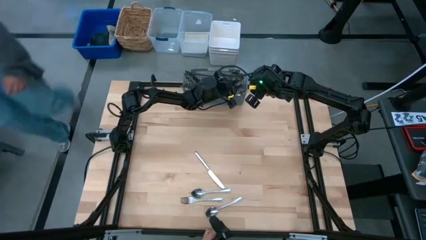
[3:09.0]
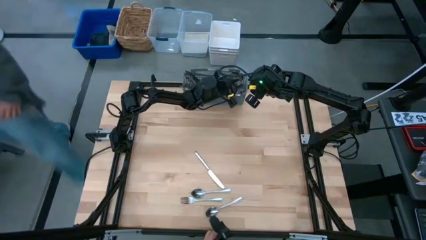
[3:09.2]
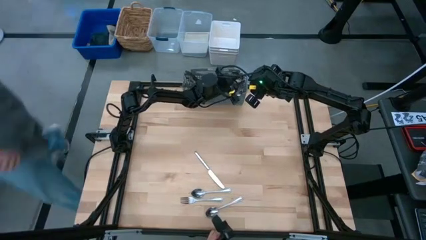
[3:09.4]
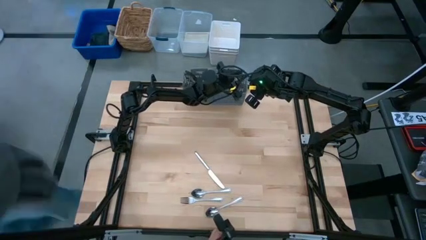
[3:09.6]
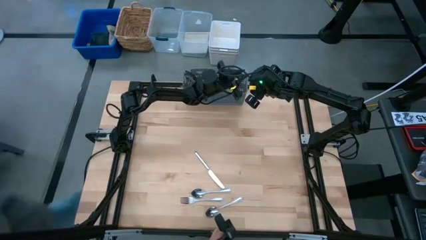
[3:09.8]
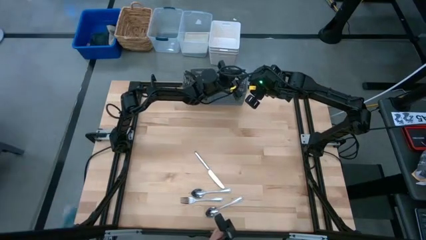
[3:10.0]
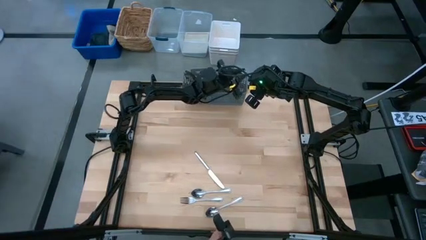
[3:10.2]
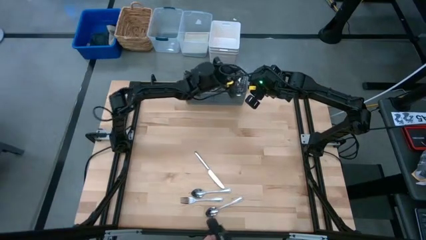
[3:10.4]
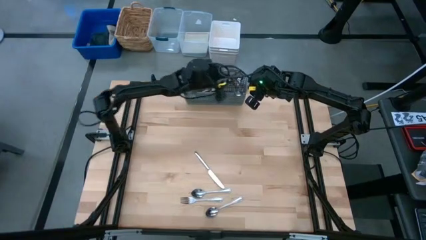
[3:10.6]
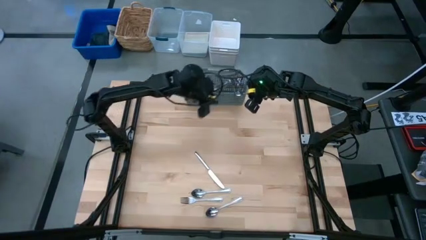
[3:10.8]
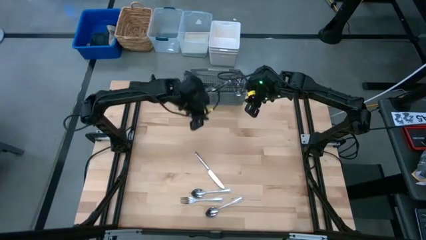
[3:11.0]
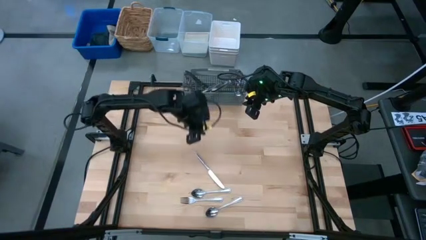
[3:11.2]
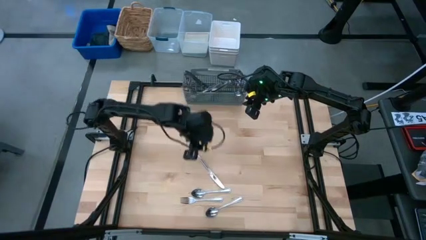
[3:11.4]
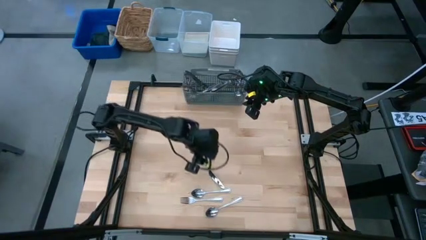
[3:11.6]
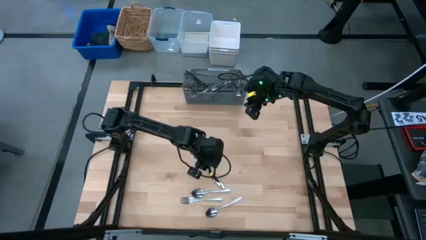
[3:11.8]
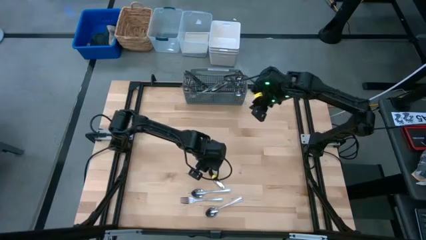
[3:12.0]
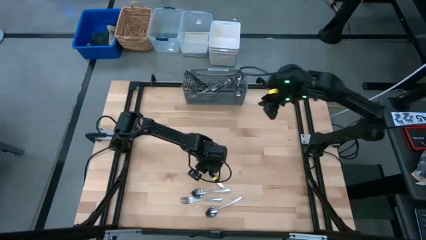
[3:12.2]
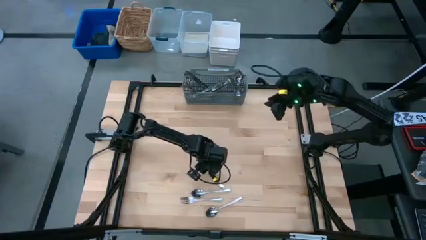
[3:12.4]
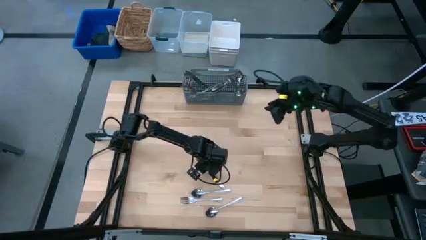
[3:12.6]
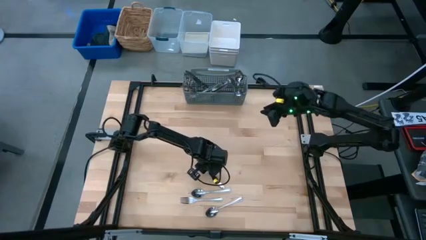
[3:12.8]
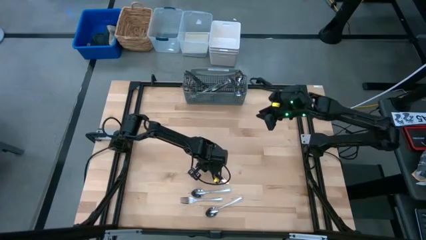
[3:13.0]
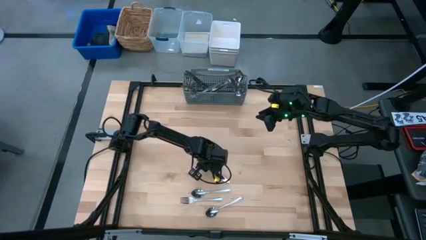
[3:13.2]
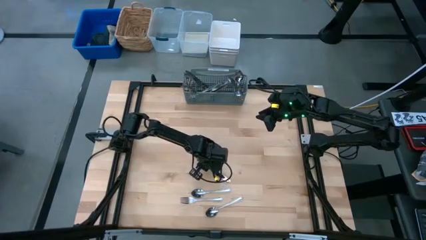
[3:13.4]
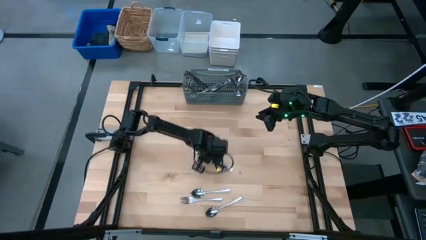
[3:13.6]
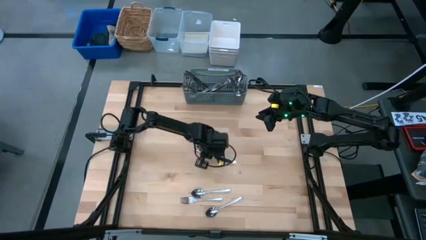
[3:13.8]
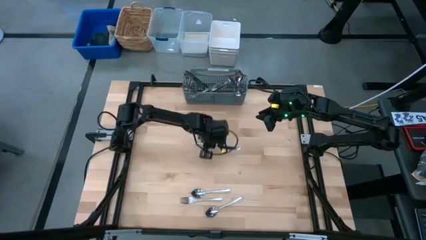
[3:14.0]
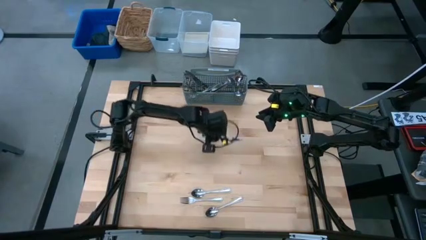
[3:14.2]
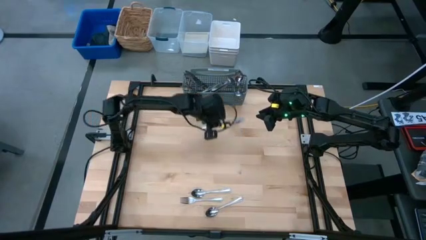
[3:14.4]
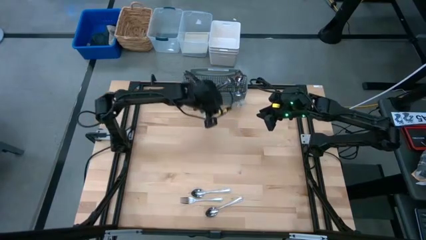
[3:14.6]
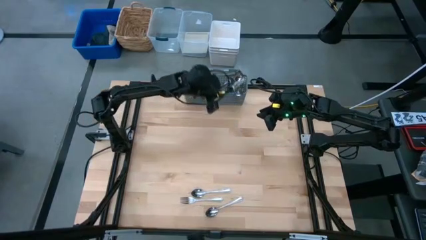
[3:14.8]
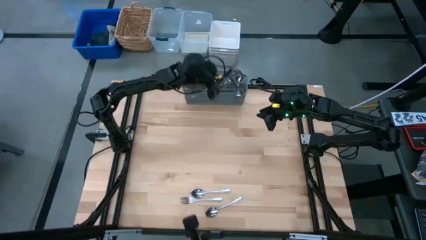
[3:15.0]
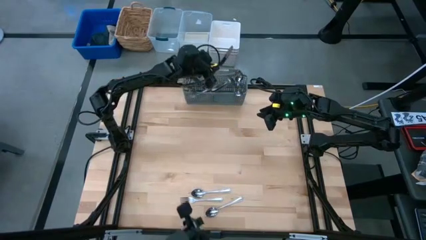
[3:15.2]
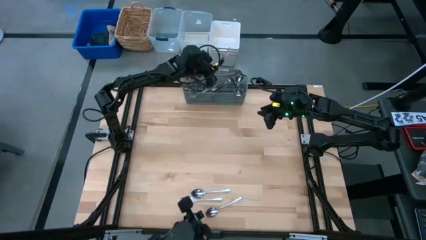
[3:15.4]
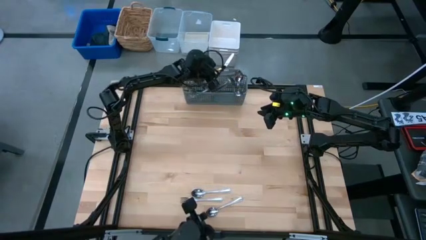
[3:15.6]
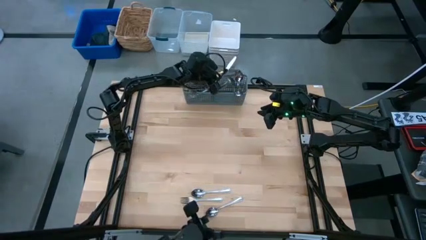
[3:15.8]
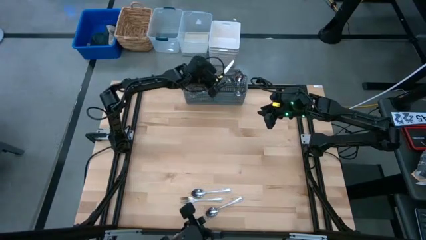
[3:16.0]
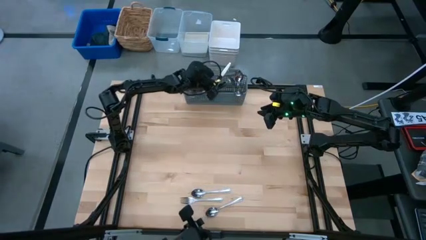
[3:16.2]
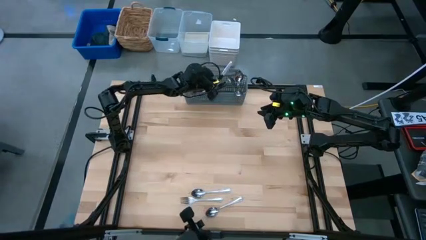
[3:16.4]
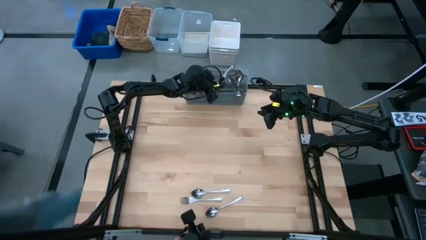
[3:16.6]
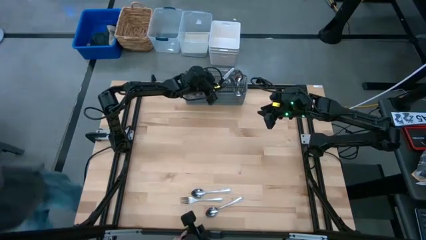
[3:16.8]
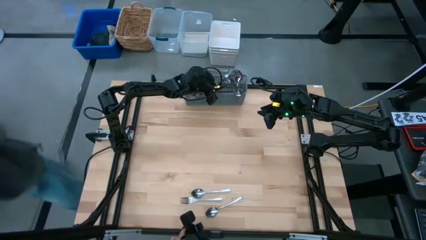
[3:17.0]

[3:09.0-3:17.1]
Put the silver knife into the dishwasher utensil holder

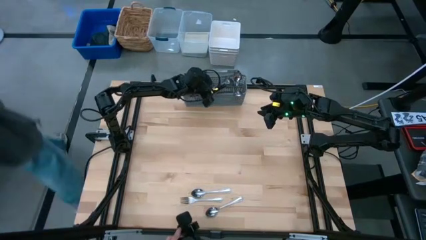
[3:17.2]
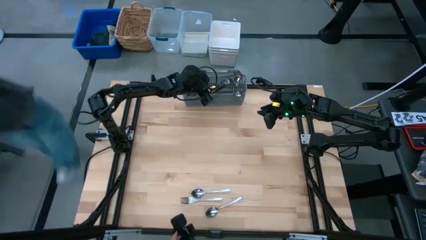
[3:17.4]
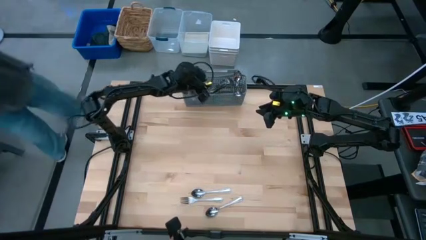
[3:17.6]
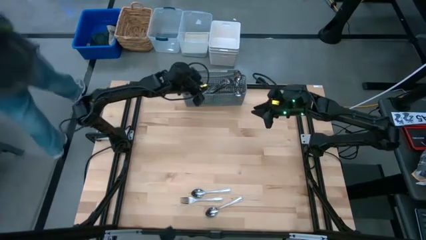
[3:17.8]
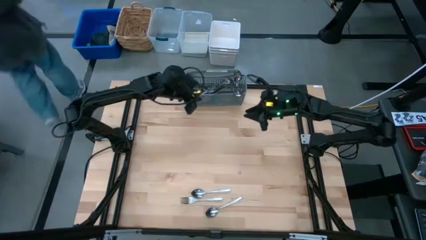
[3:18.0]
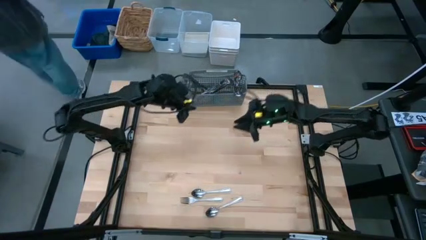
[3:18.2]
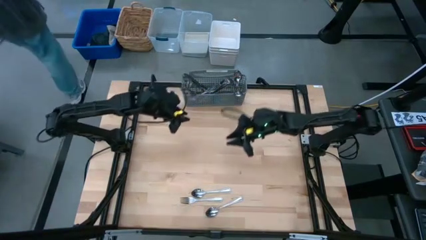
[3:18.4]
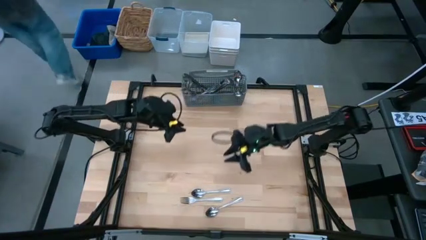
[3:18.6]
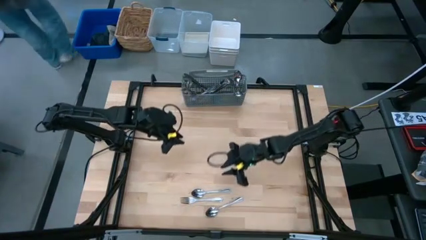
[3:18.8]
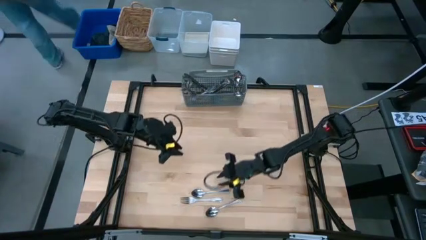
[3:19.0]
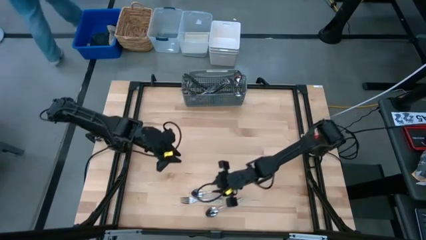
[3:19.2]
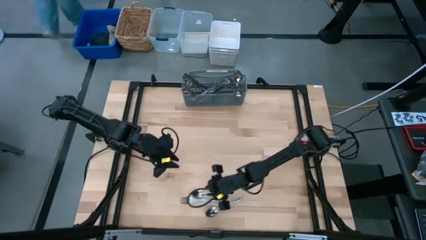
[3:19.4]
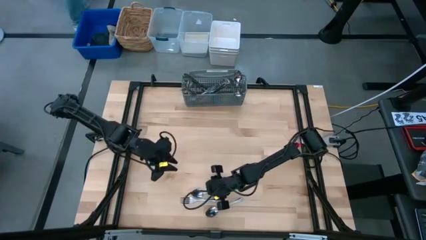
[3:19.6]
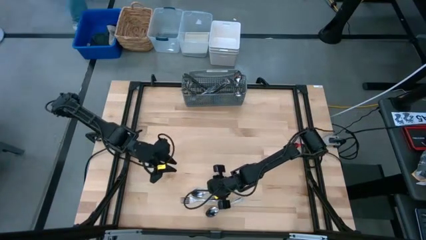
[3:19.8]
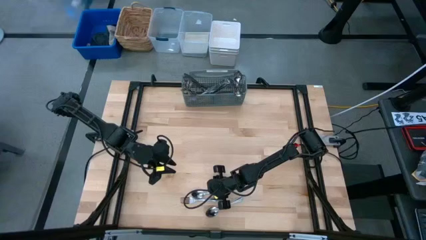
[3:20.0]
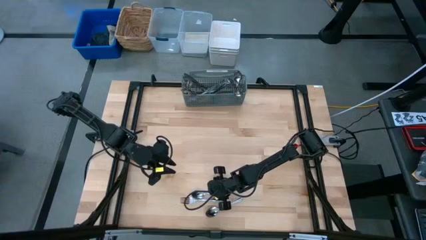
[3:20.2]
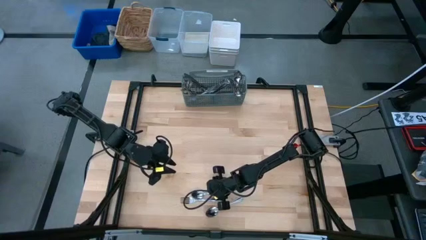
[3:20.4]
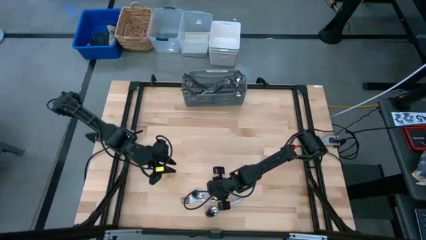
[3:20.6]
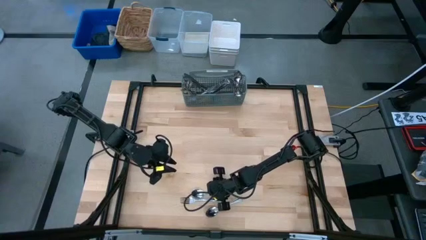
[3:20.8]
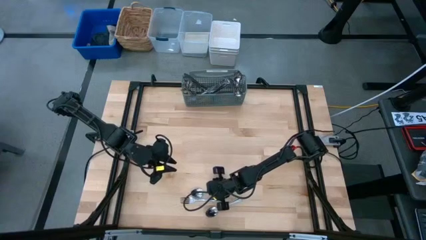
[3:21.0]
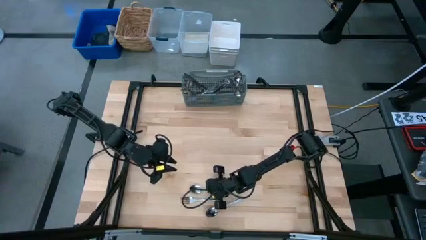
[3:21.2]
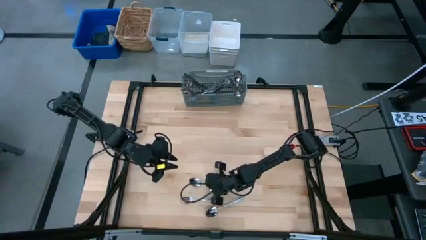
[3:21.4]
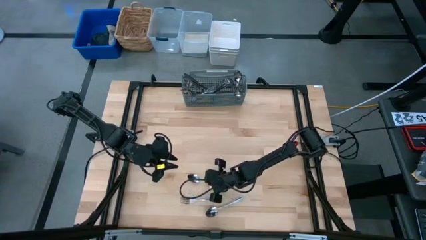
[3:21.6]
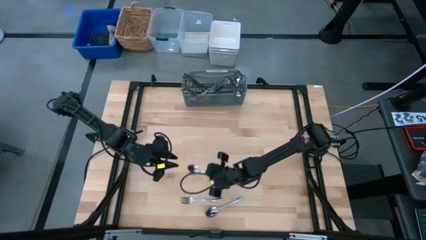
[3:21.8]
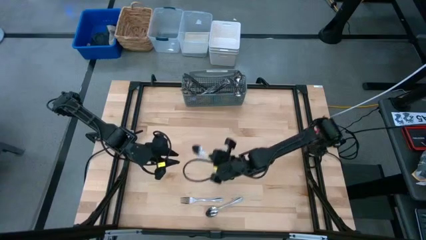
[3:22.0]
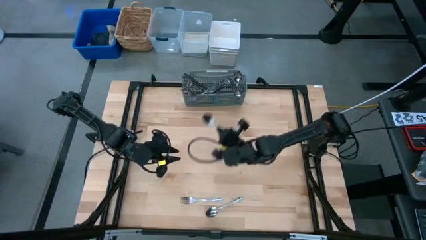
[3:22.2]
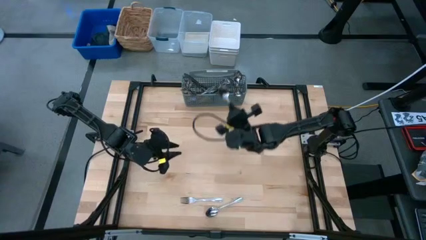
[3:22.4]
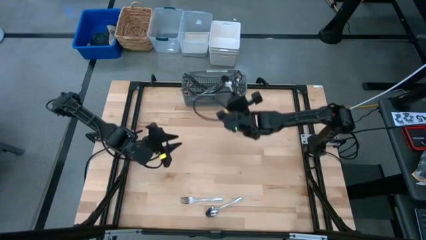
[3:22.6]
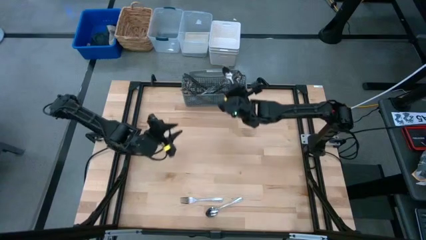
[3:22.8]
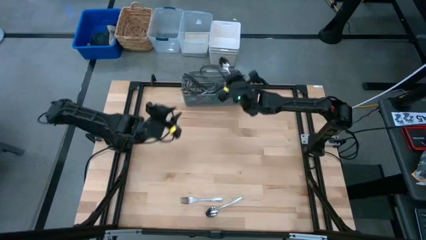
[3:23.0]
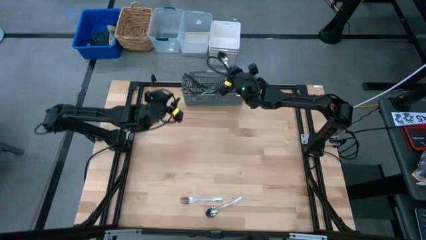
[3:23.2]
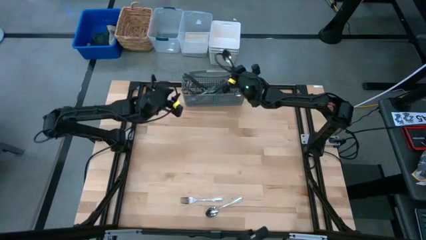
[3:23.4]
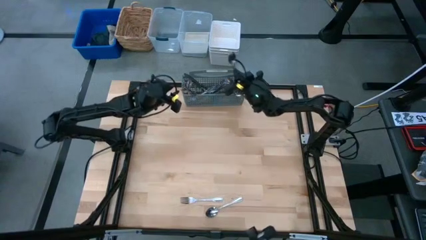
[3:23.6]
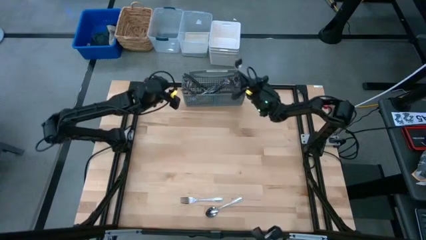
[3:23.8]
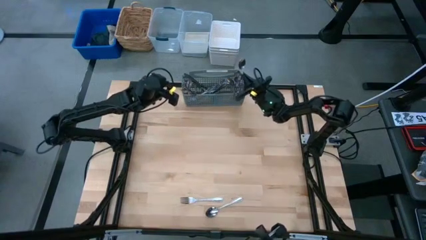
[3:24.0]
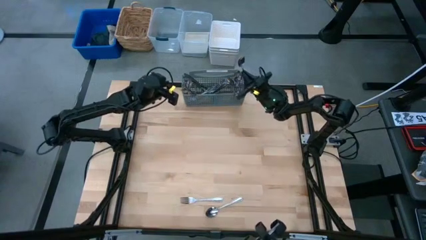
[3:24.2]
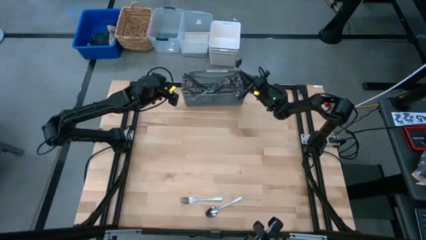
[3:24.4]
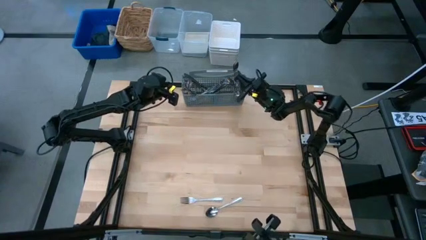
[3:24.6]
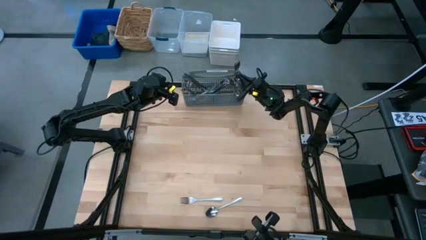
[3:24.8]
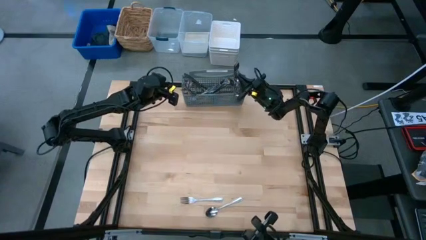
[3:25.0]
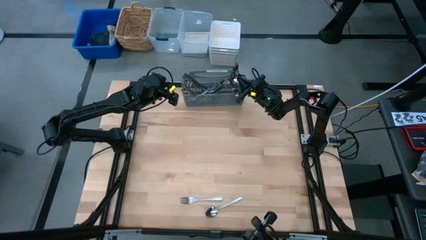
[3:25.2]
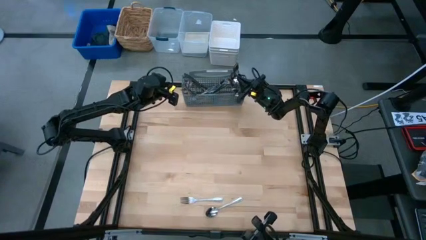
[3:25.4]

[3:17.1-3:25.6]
Put the silver spoon into the dishwasher utensil holder
